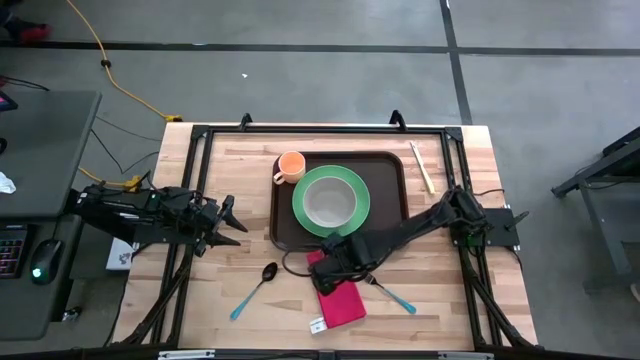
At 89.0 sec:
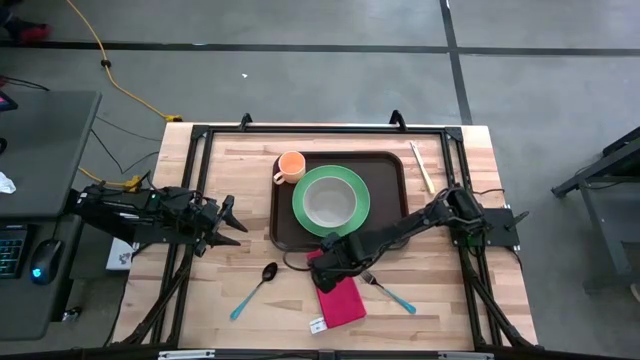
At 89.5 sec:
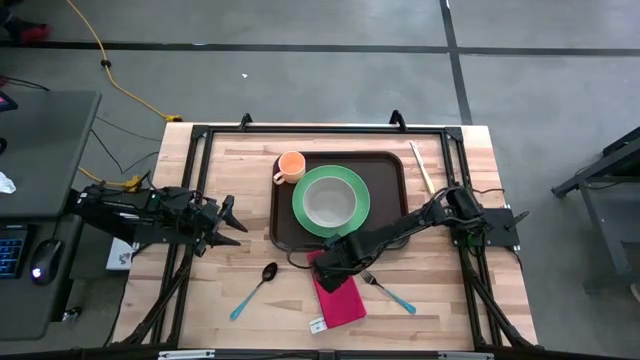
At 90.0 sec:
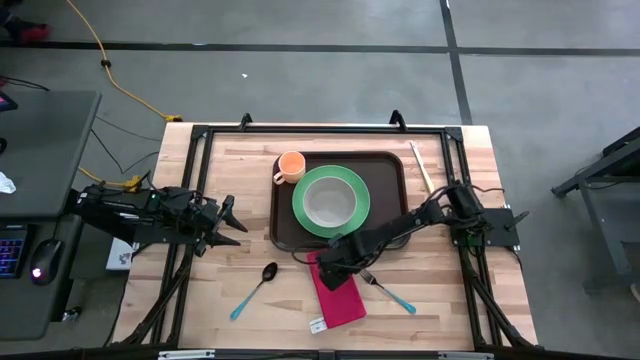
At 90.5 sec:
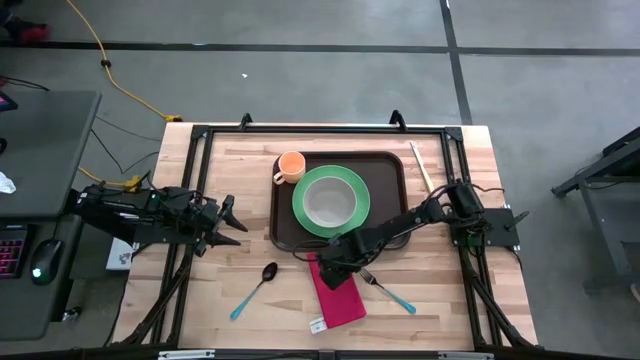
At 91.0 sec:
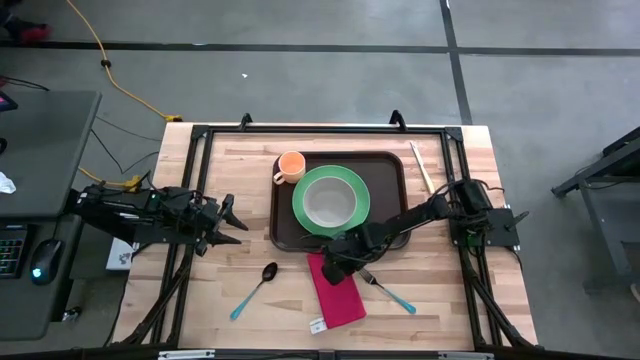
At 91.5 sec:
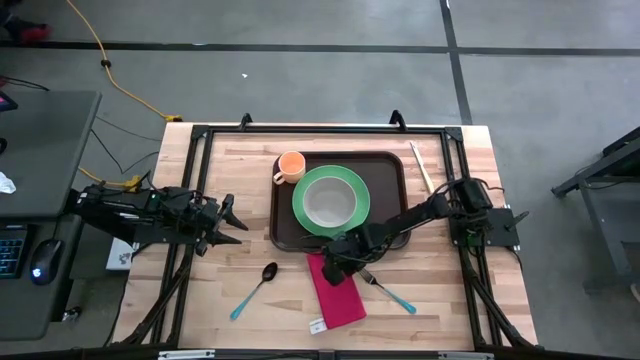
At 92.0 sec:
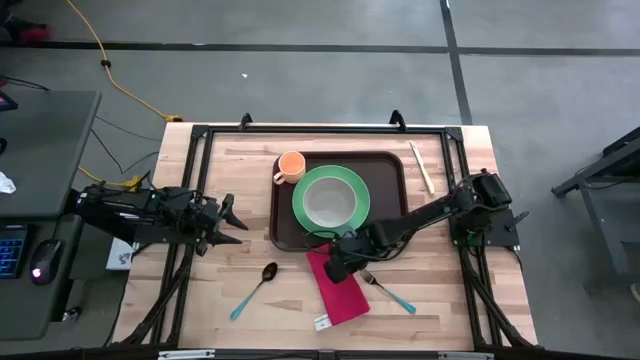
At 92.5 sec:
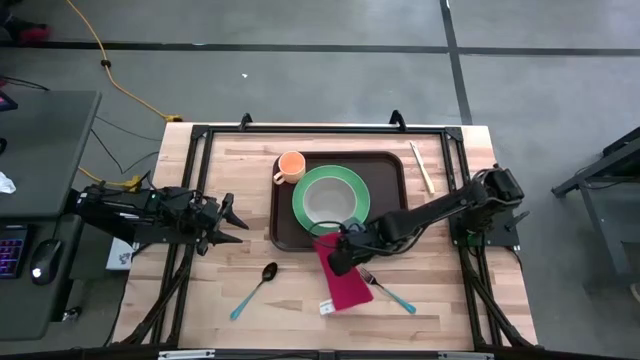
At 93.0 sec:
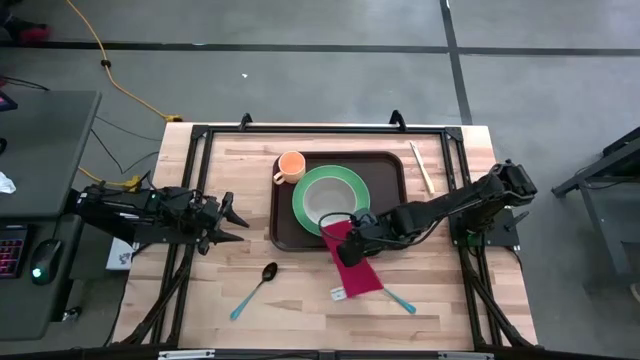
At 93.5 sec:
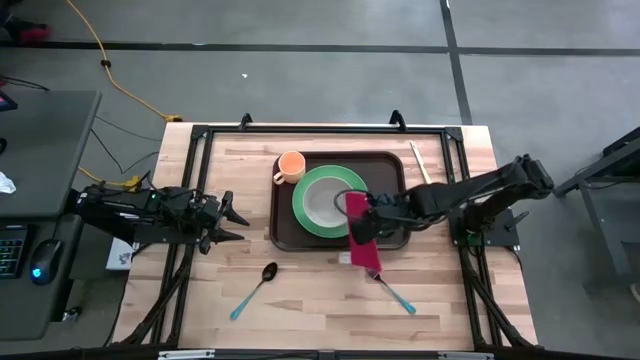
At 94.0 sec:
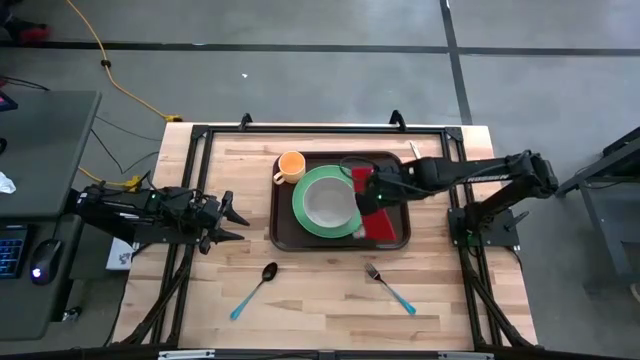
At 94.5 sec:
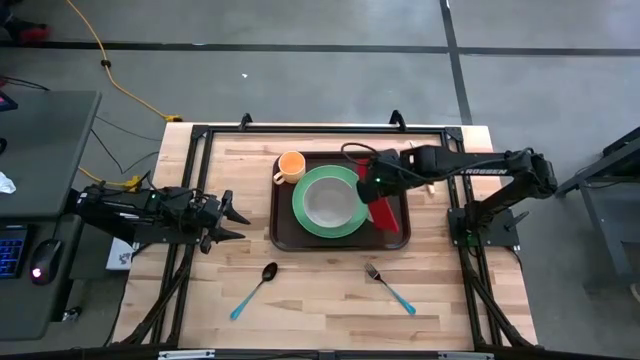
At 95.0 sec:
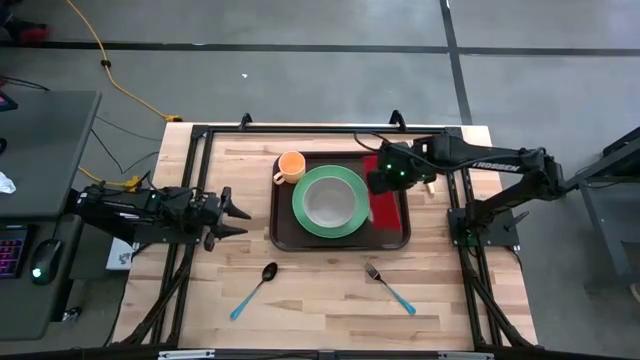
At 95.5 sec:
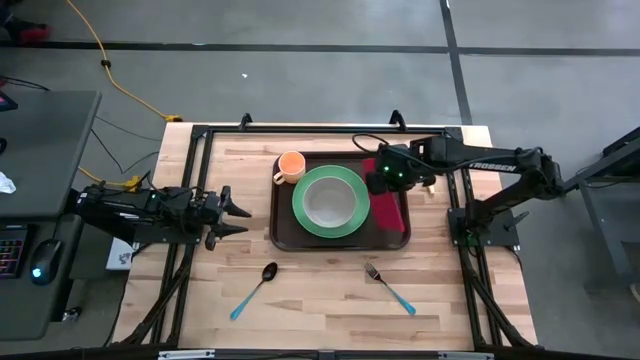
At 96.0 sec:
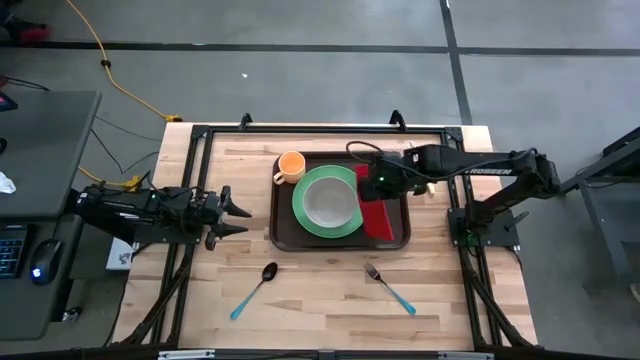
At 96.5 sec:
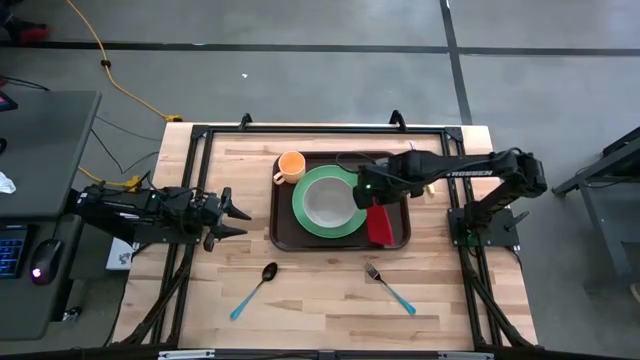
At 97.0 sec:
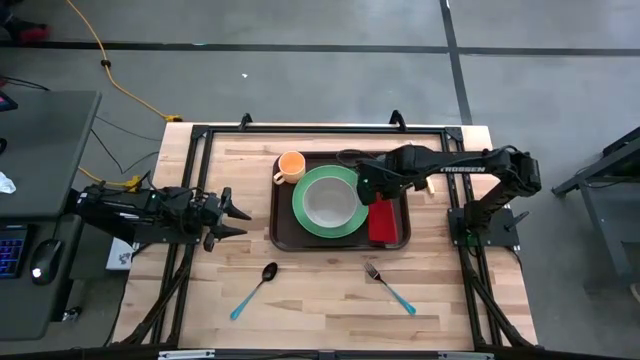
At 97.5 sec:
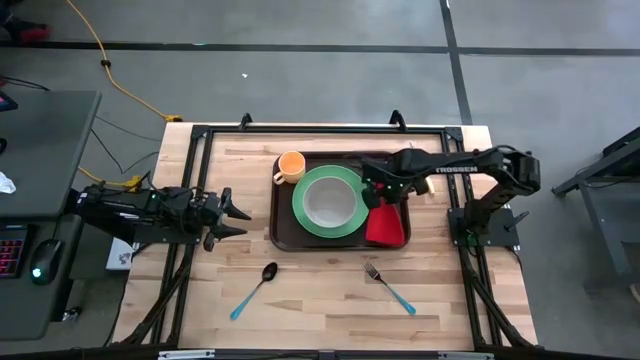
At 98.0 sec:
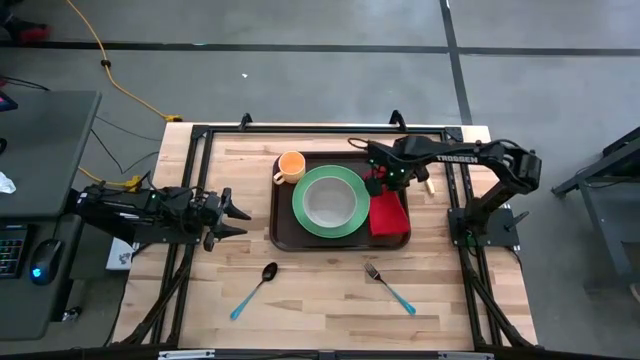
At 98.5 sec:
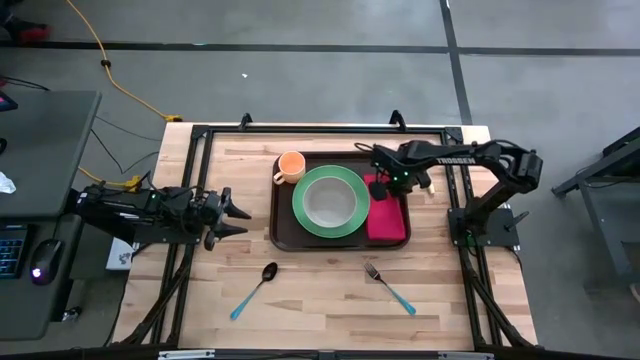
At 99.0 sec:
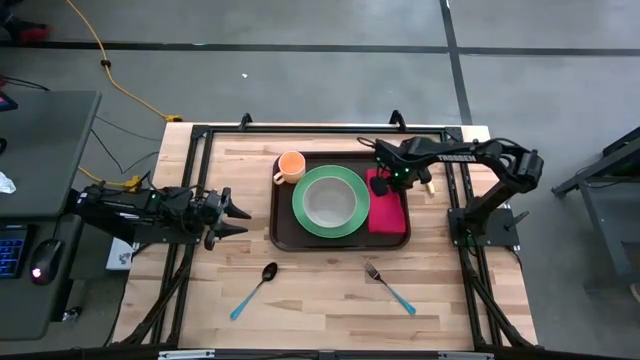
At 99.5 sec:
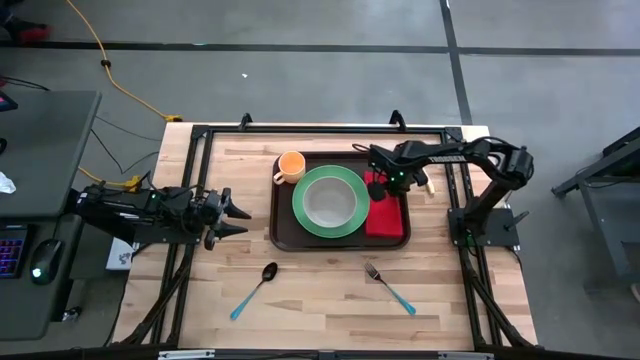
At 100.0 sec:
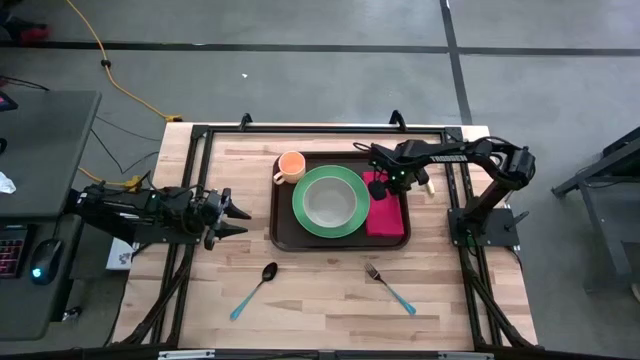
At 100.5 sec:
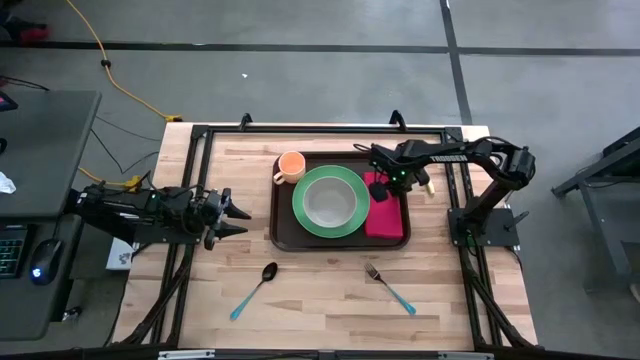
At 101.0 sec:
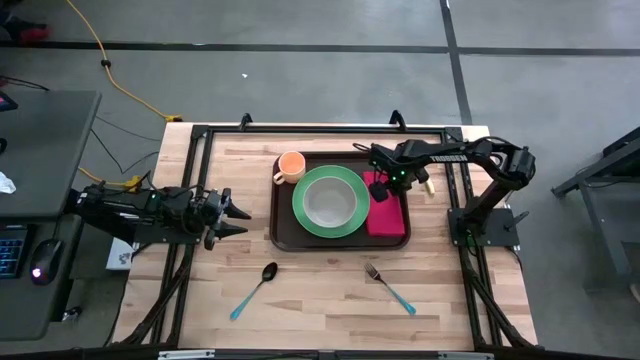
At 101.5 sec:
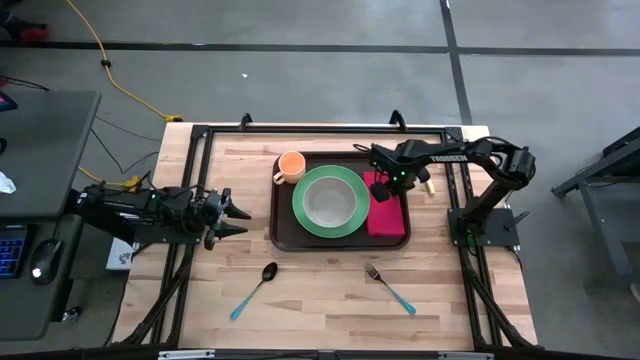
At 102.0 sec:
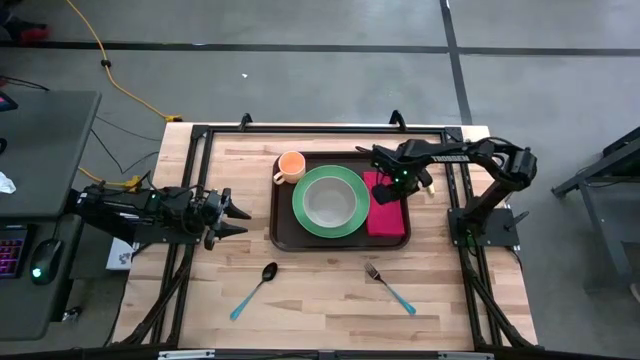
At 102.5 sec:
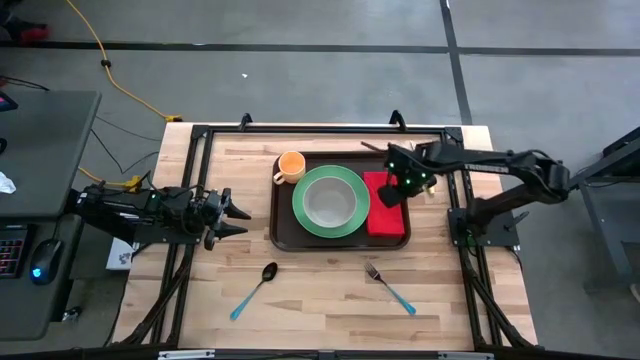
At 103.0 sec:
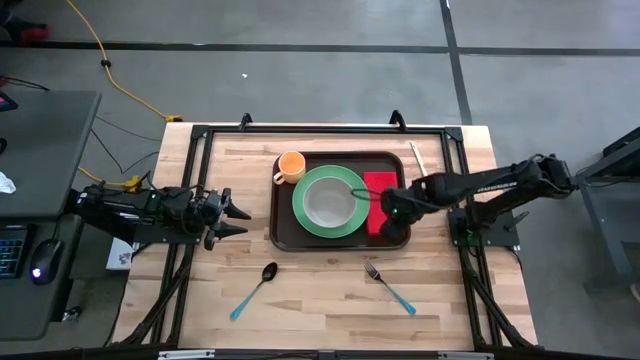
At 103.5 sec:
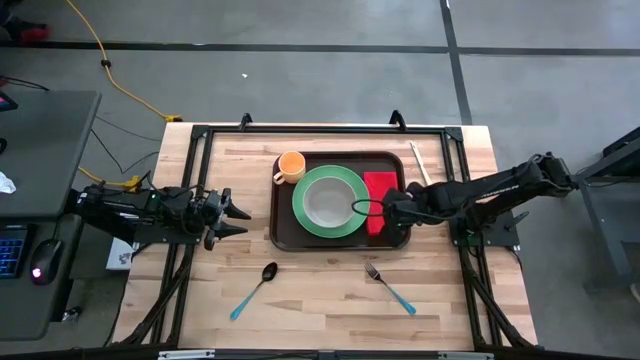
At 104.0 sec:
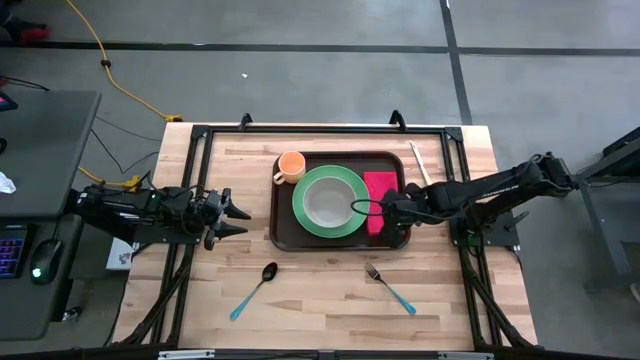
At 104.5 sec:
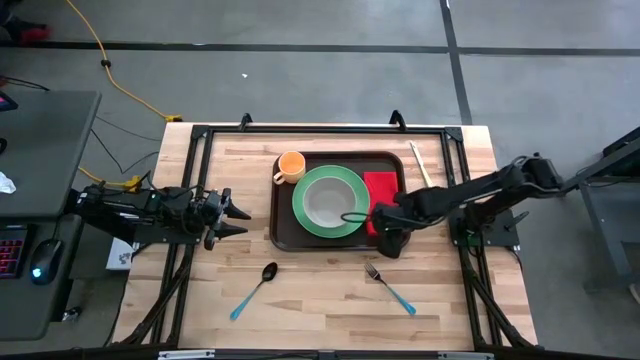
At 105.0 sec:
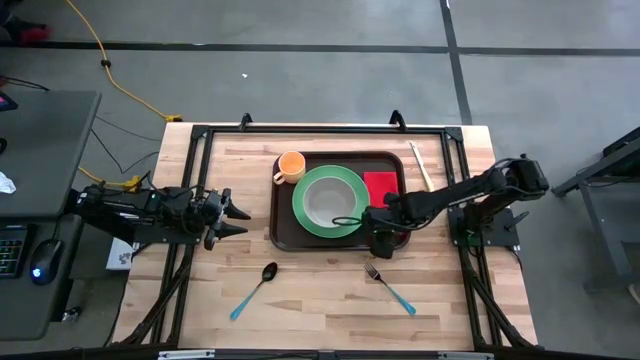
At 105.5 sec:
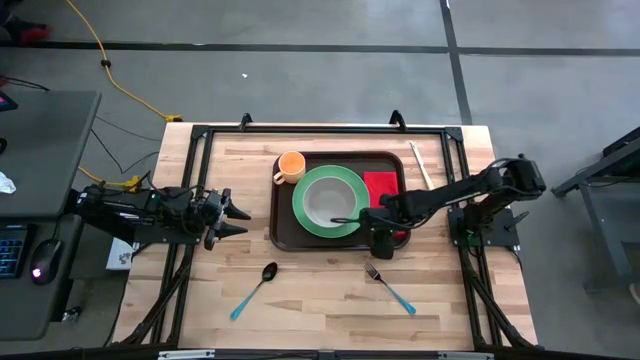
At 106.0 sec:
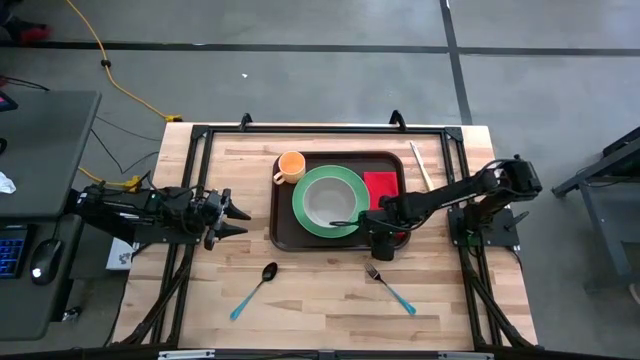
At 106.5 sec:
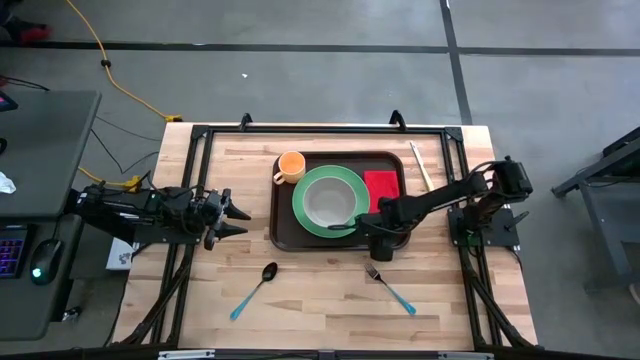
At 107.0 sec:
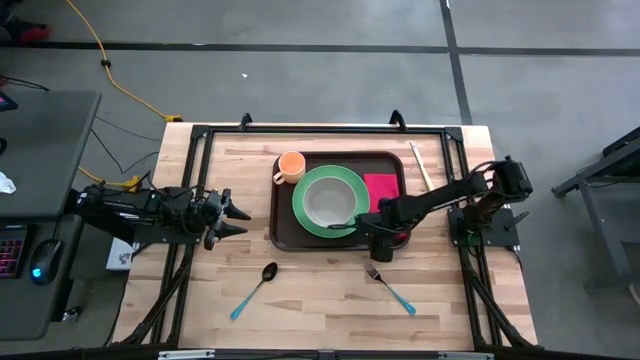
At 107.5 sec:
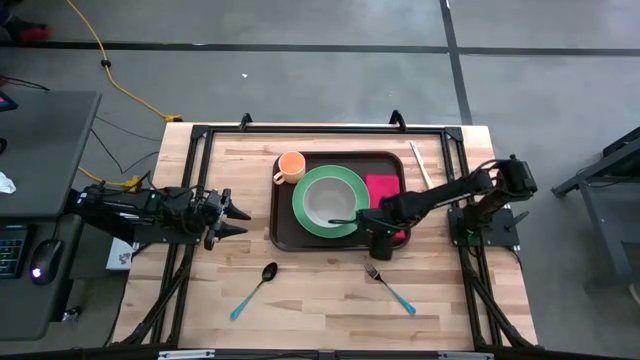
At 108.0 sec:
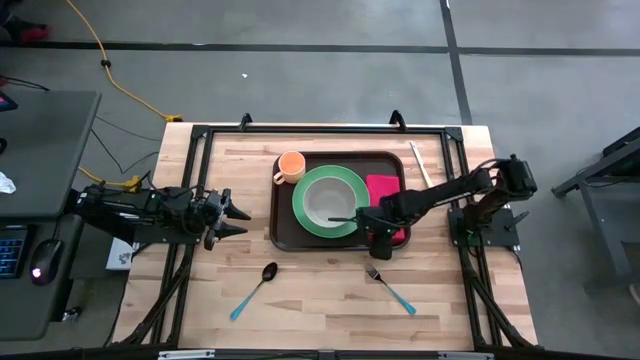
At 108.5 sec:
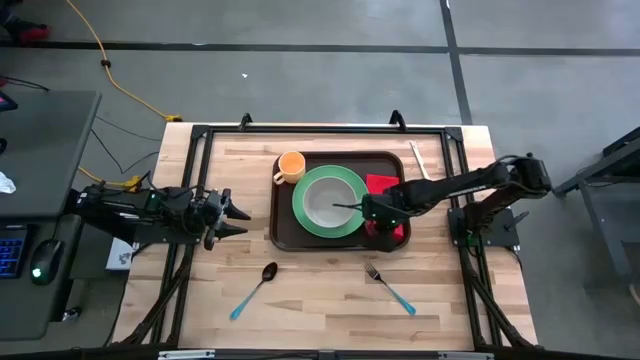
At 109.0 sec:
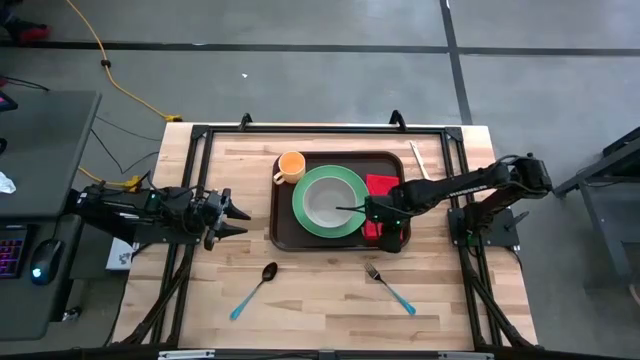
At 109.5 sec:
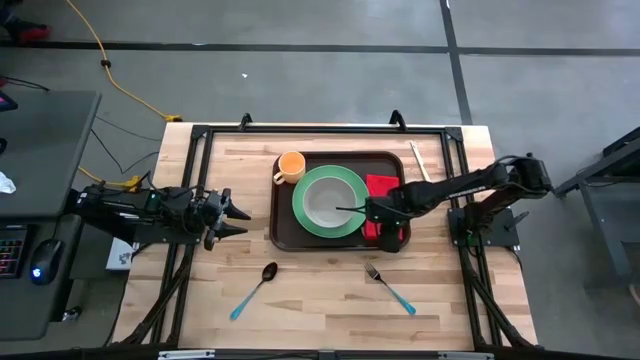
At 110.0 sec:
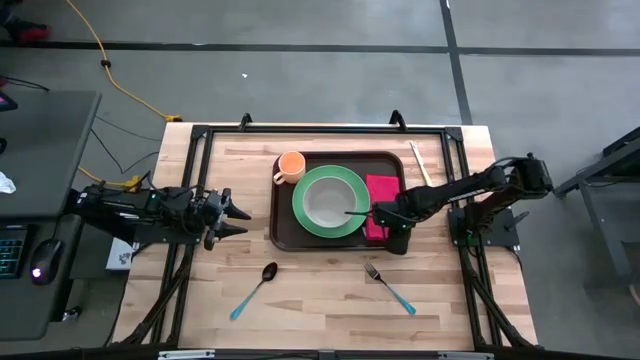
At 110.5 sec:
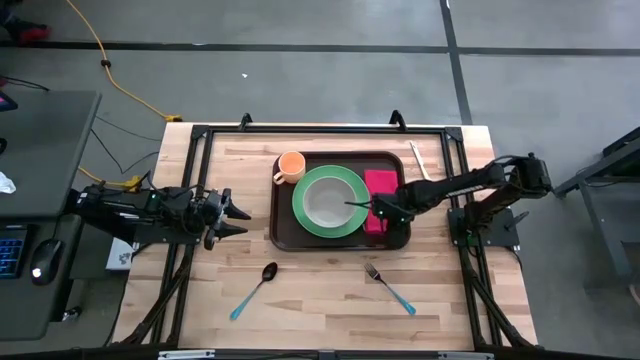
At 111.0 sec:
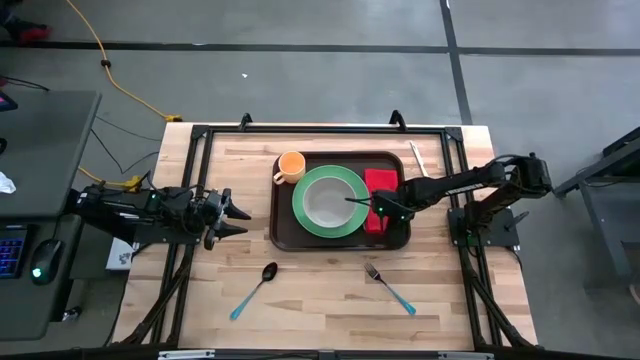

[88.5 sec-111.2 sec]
Task: Set up tray
Put the red napkin on the brown serving tray to the right of the green plate
